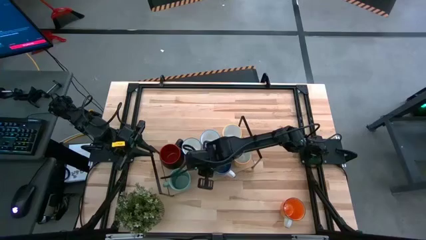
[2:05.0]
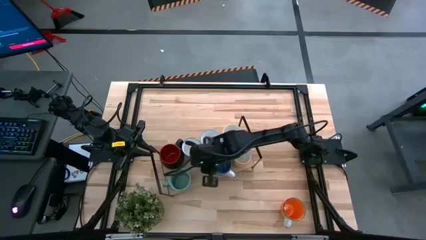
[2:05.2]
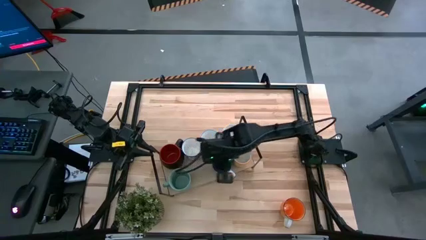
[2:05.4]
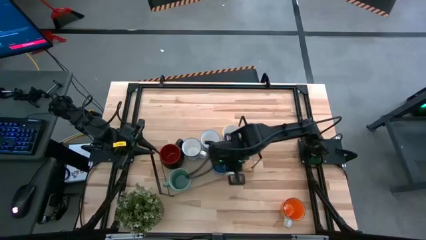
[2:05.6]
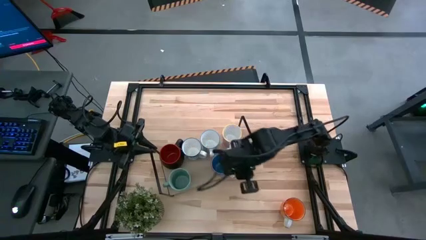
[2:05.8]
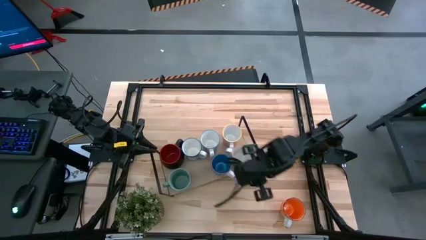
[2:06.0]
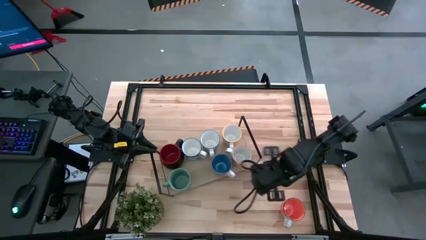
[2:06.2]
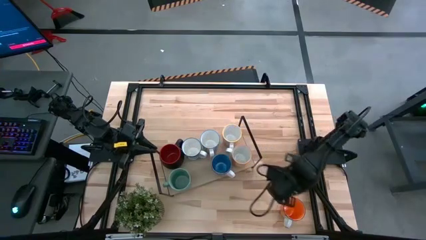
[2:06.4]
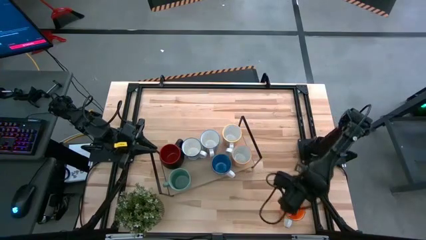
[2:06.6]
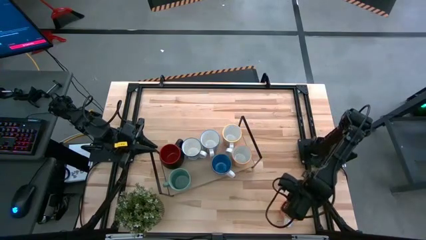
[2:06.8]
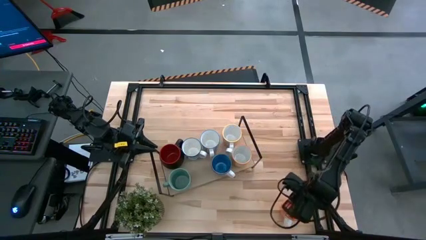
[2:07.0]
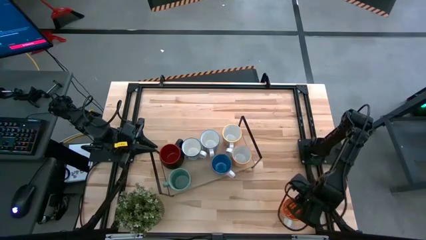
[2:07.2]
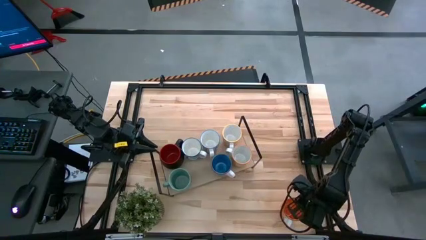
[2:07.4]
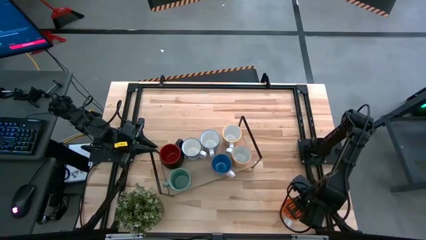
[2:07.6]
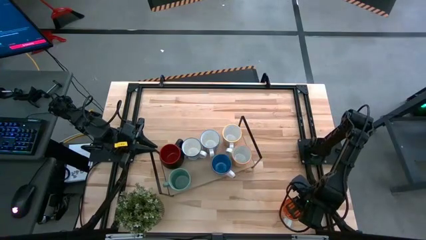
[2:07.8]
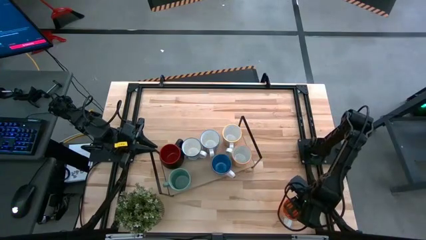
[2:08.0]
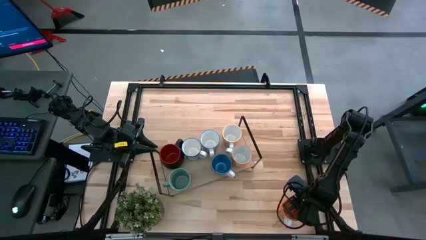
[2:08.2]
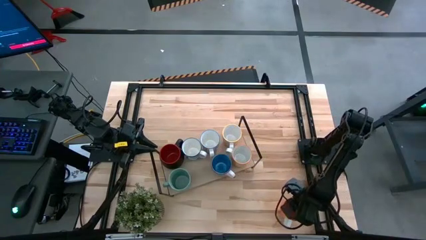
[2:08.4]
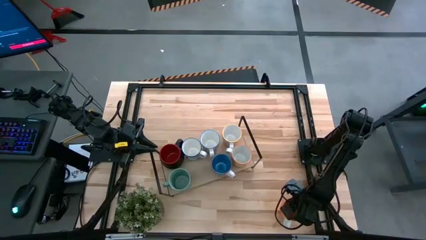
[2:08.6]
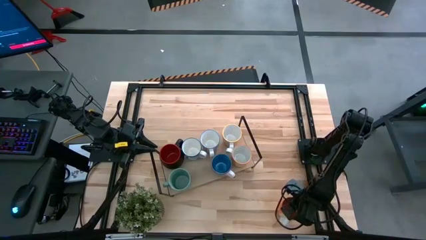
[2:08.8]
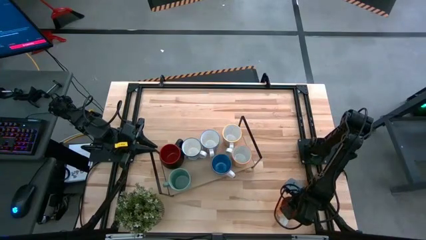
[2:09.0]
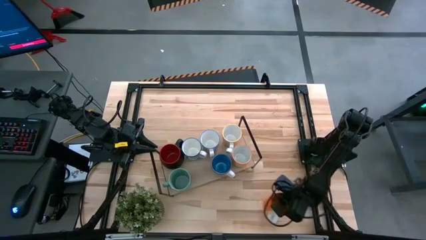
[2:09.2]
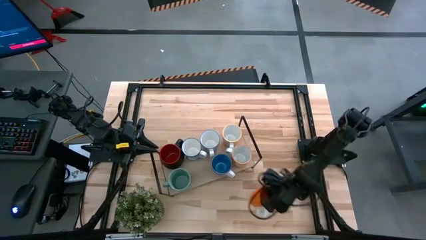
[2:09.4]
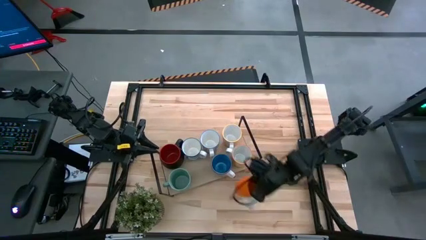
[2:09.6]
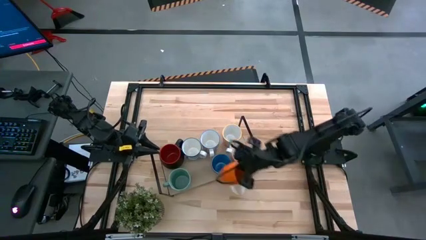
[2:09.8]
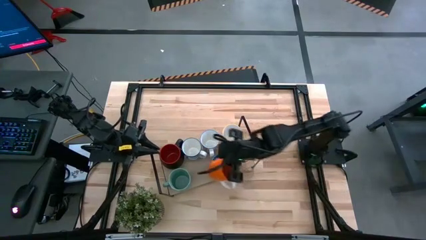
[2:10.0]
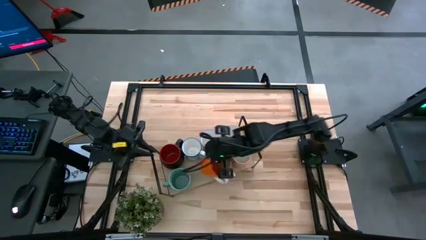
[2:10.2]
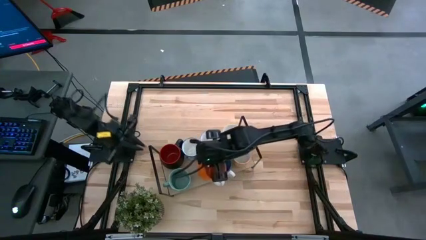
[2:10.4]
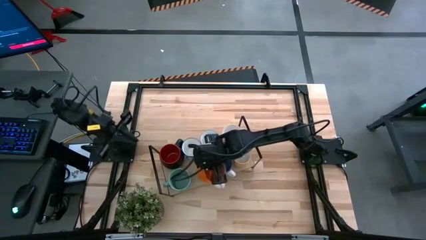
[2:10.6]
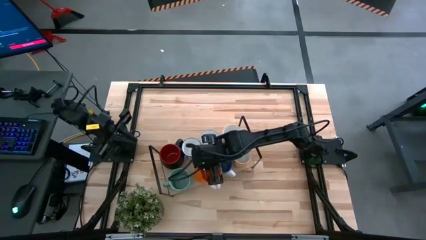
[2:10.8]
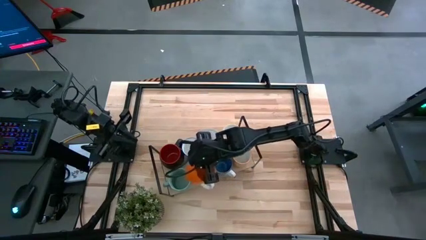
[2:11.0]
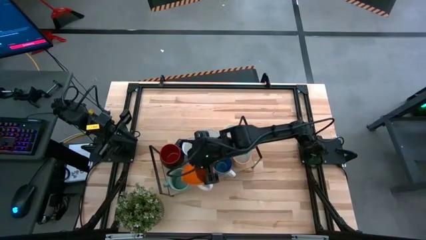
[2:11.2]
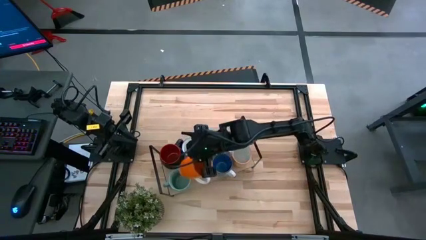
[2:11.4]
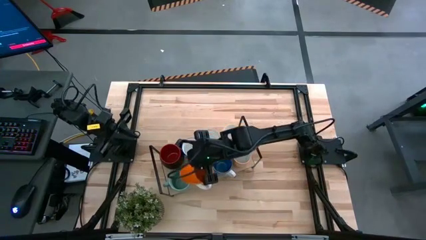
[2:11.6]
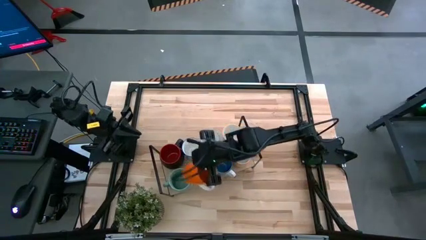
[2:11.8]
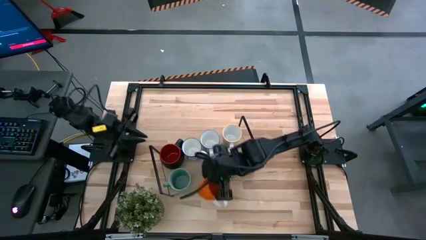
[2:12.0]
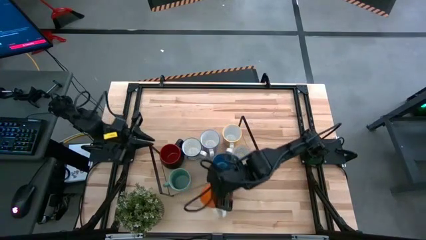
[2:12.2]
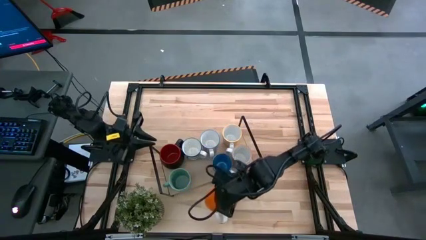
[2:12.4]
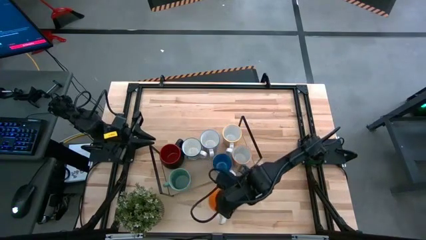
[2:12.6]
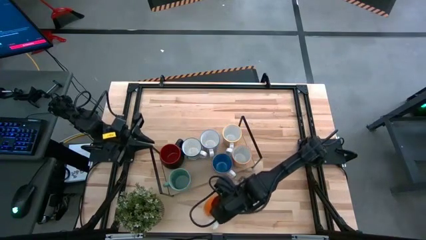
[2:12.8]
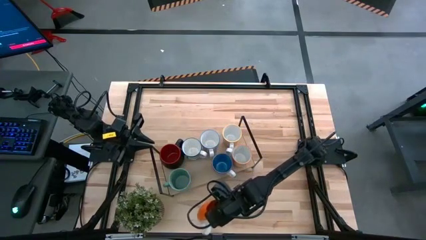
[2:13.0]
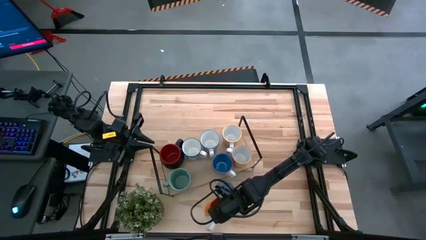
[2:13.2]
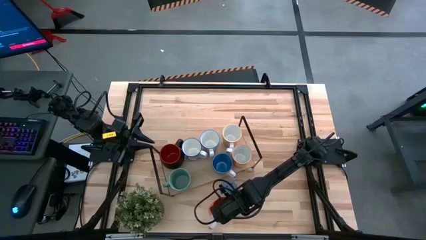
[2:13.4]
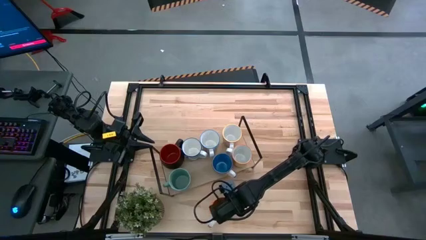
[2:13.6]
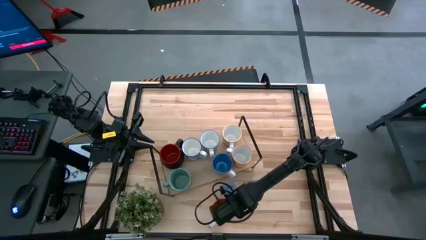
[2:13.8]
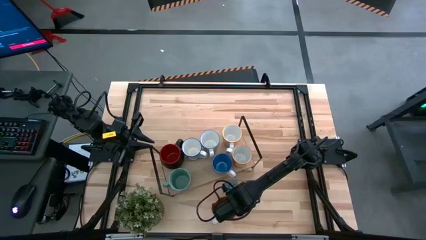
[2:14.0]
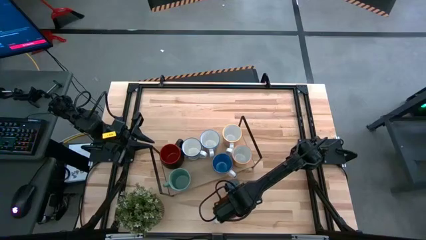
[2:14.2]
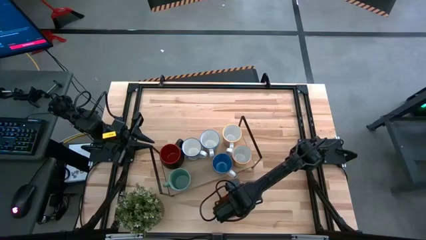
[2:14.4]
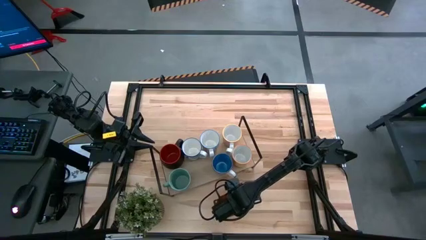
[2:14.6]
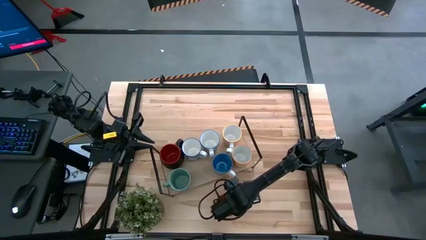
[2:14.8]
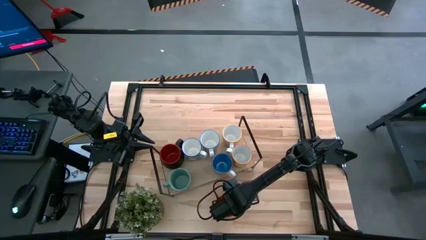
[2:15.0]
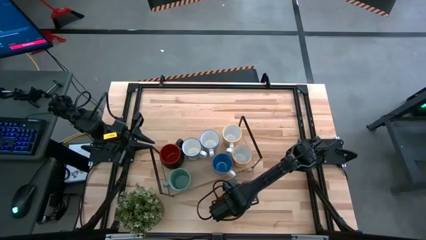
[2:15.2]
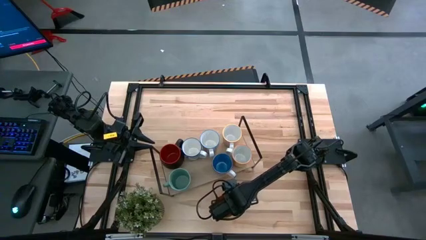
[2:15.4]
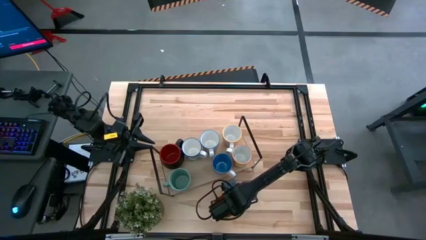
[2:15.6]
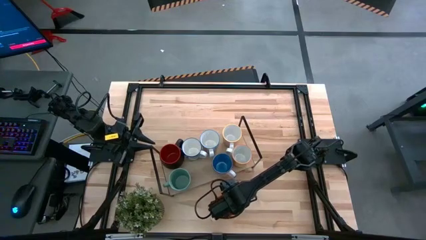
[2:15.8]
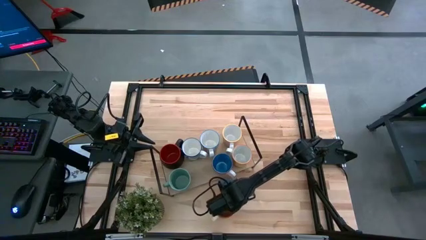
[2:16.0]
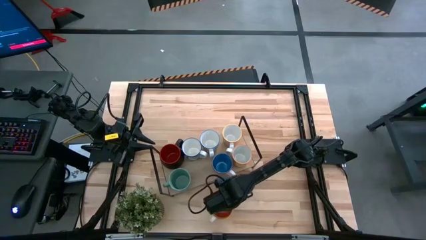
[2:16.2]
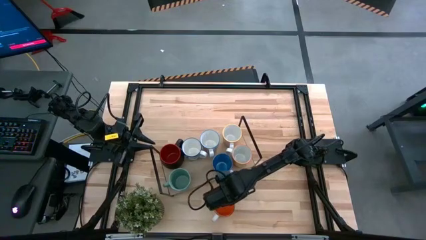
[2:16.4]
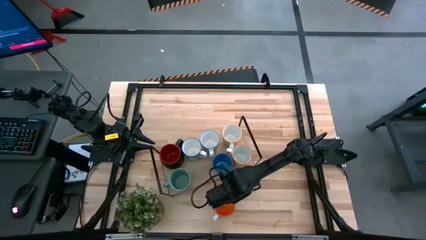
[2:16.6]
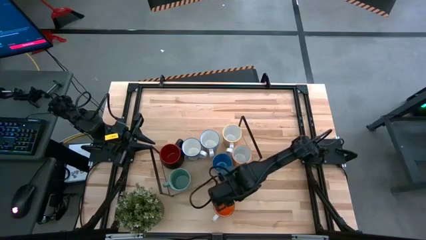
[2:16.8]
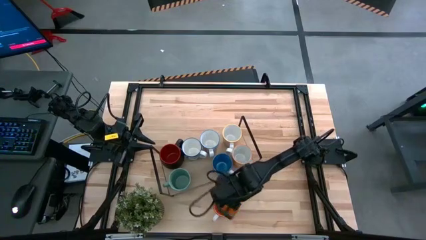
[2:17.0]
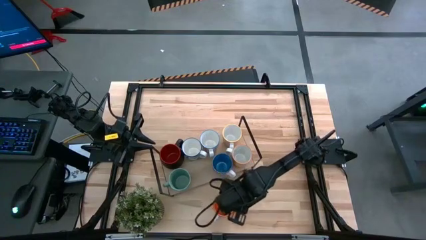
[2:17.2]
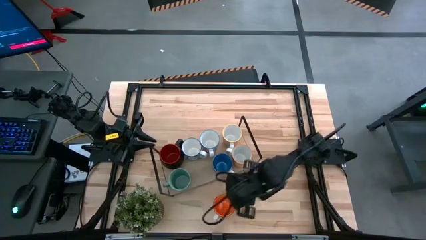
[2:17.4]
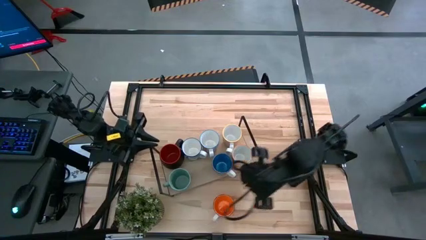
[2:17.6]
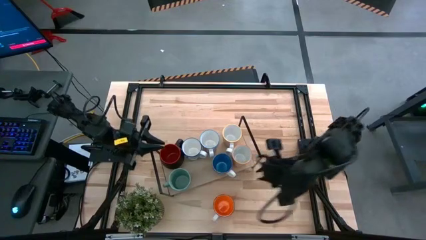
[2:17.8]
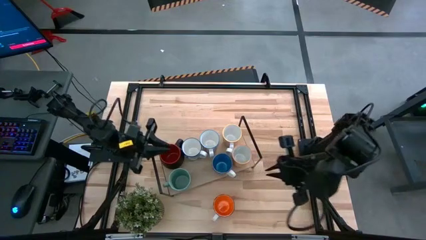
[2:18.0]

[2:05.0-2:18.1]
Task: Place coffee mugs
Put the orange mug on the shelf
